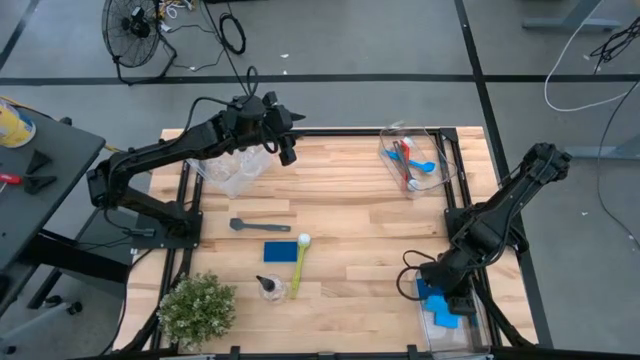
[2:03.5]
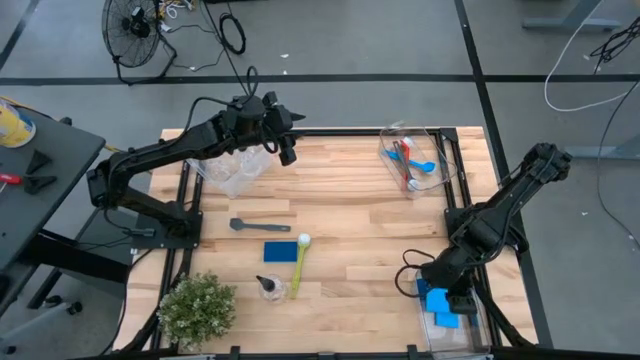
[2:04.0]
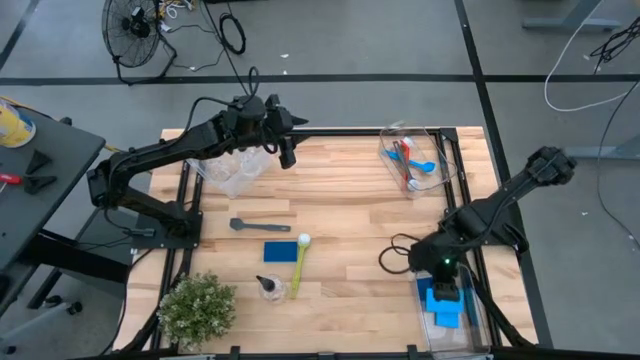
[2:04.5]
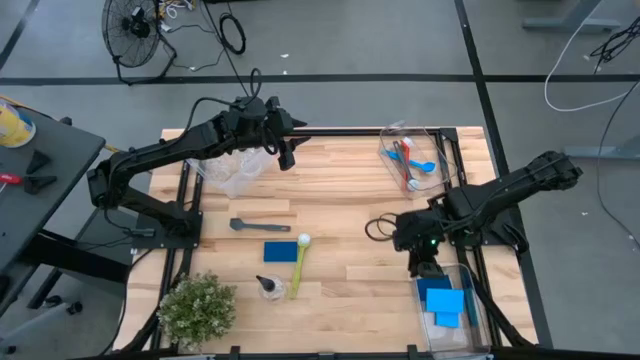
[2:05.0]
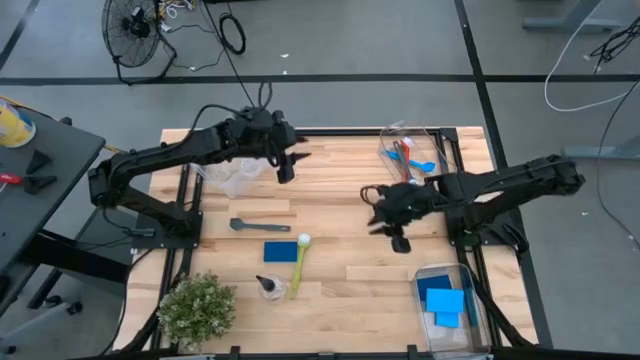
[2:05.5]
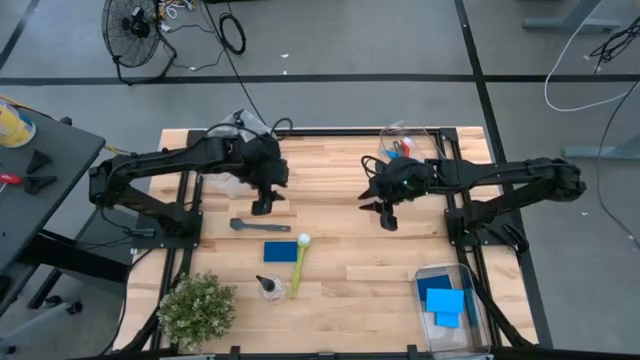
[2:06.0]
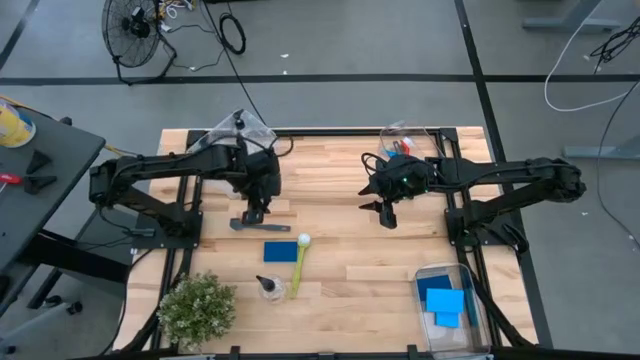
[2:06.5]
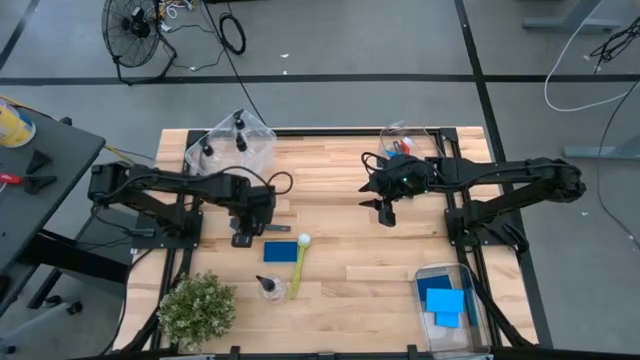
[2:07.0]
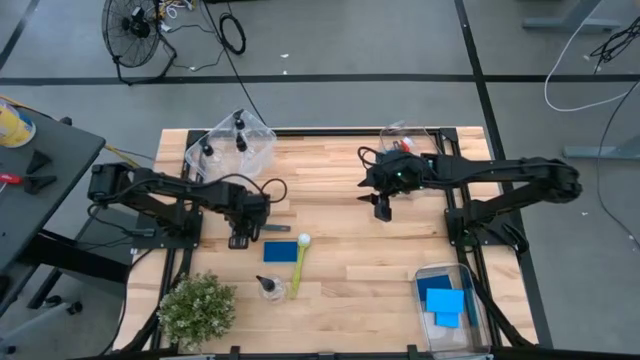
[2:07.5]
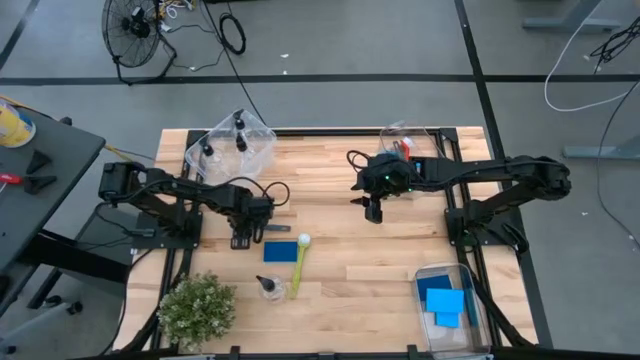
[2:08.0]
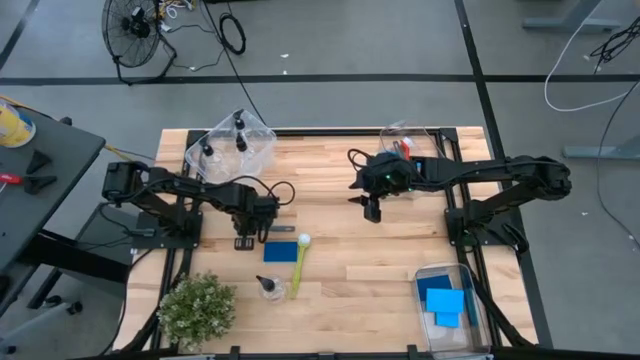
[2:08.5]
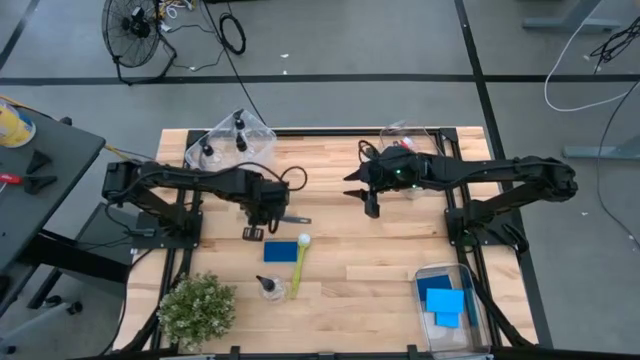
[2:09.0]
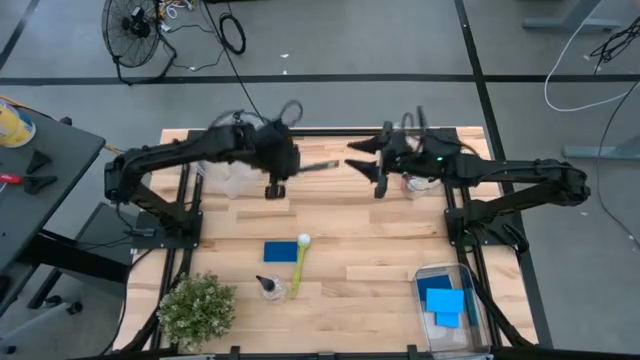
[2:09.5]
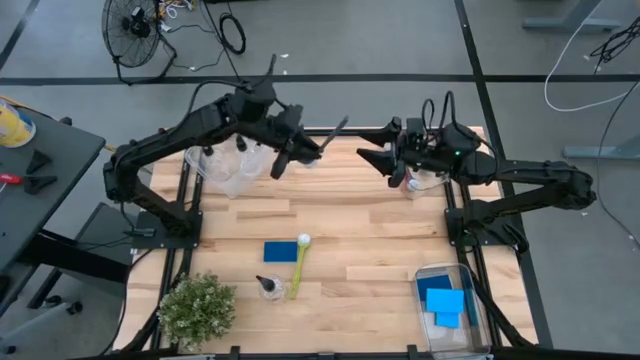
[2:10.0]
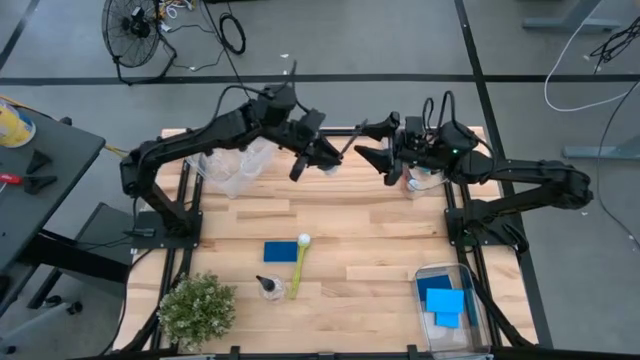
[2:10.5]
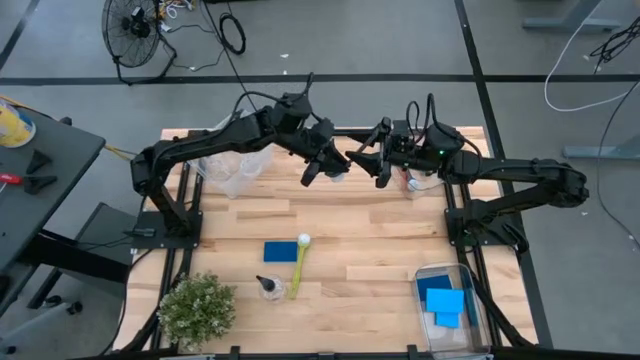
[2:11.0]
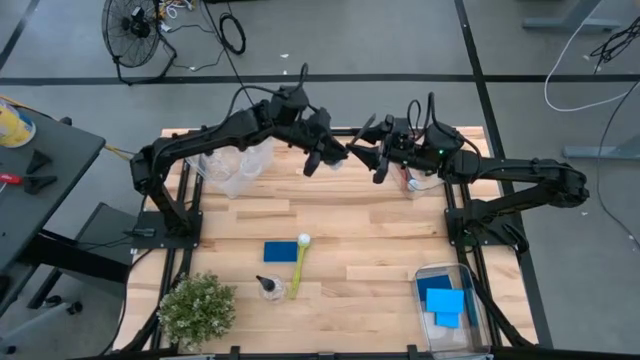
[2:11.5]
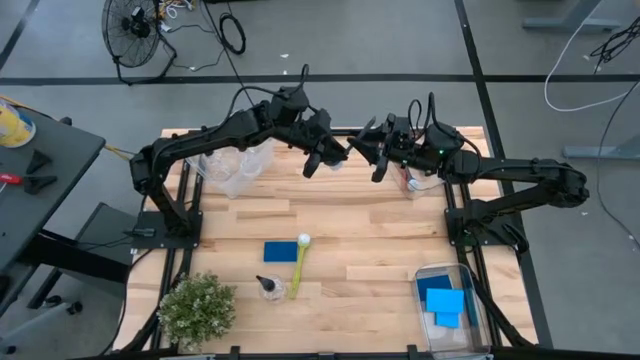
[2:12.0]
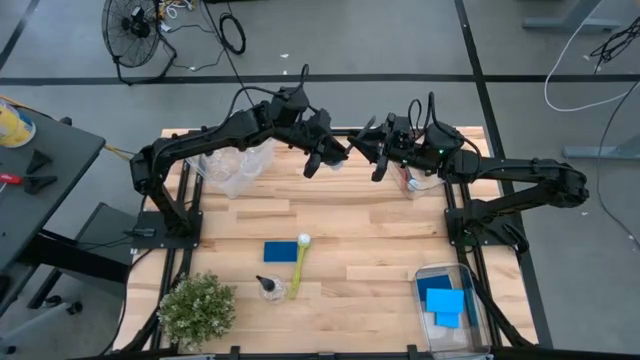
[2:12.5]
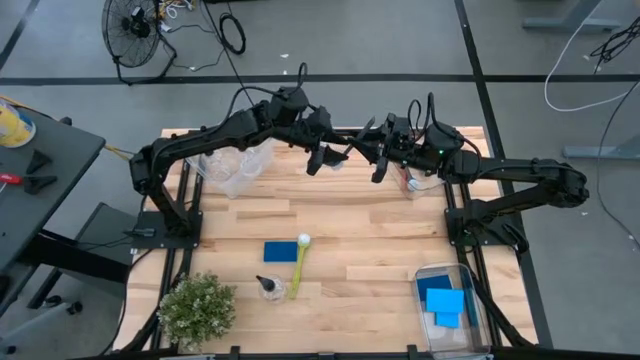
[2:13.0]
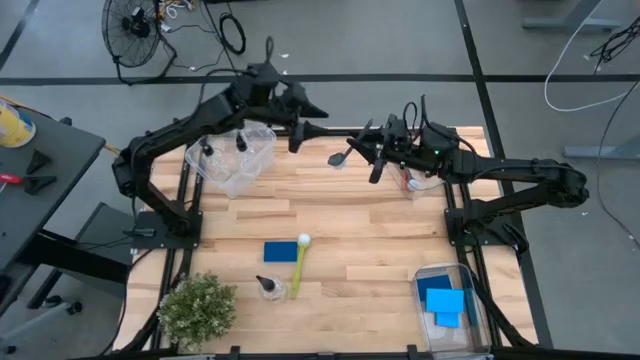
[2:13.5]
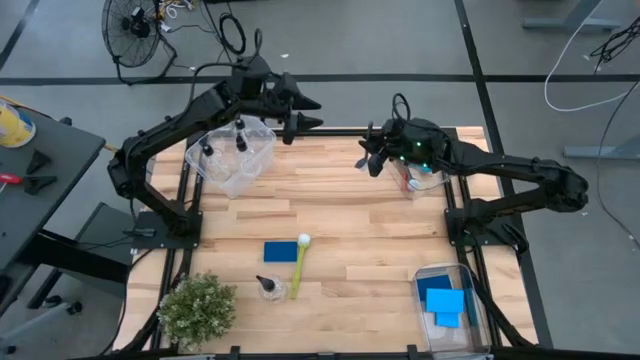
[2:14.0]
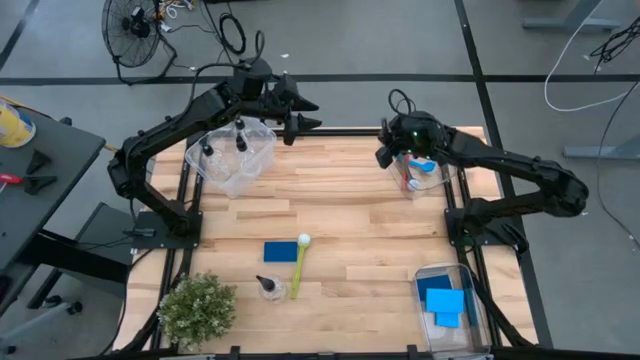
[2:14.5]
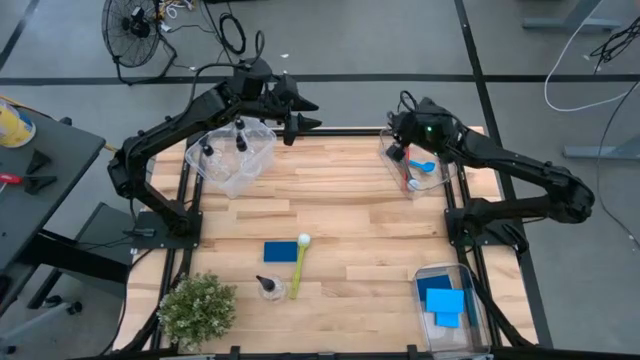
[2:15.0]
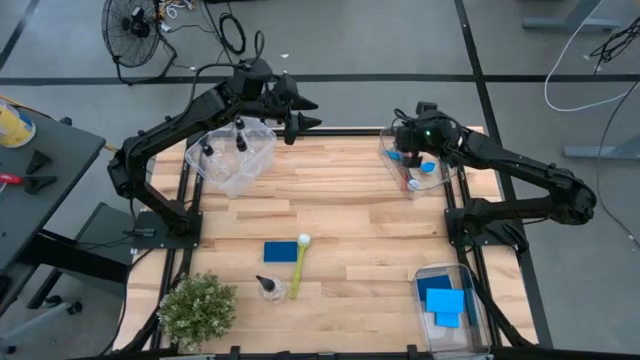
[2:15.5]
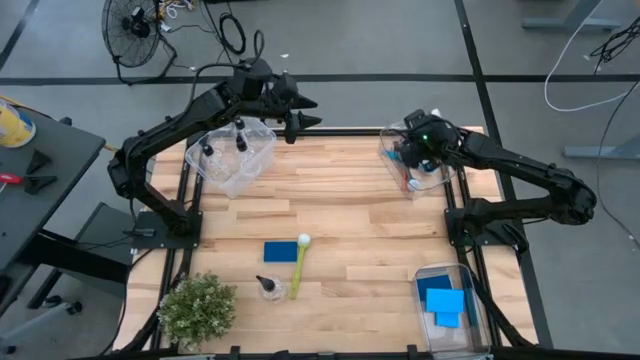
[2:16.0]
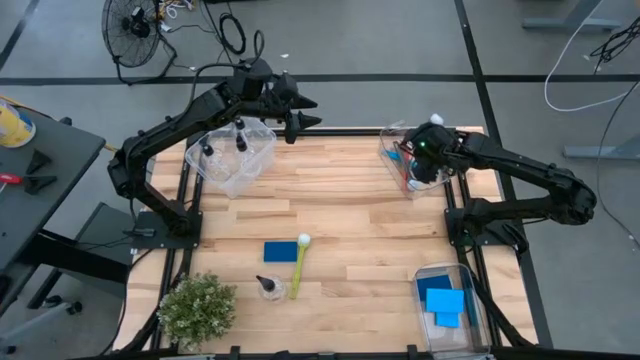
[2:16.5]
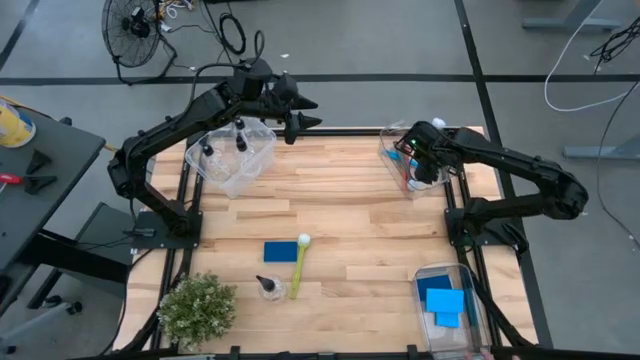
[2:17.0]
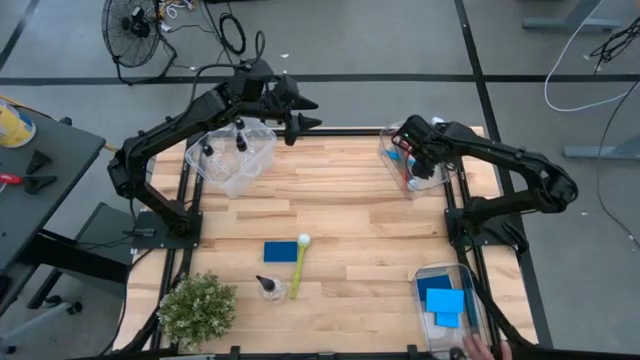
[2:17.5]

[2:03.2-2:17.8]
Task: Pick & Place Kitchen Sink Supplies
Put the gray cleaning brush into the top transparent bin

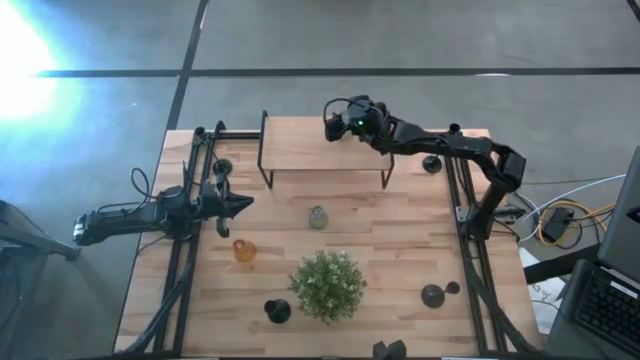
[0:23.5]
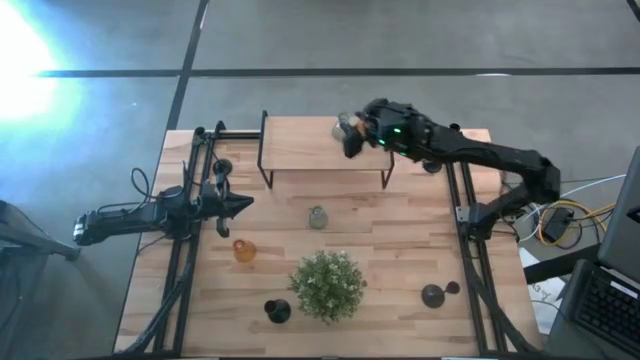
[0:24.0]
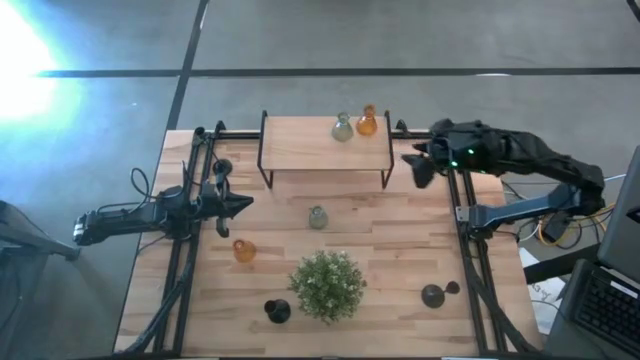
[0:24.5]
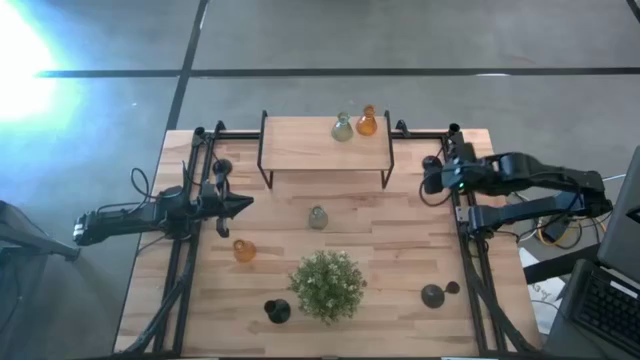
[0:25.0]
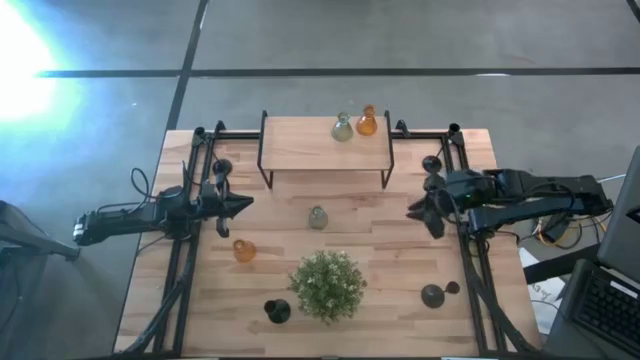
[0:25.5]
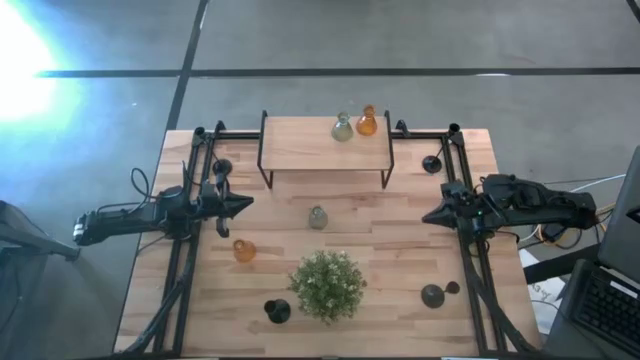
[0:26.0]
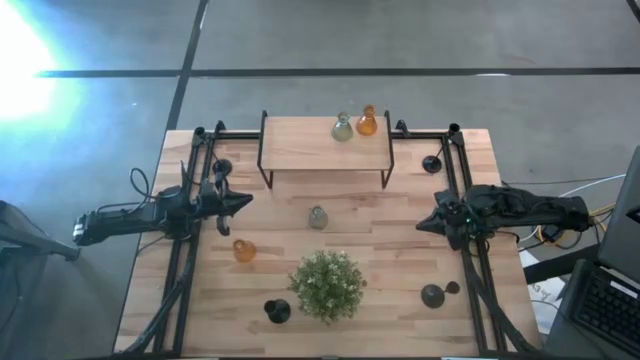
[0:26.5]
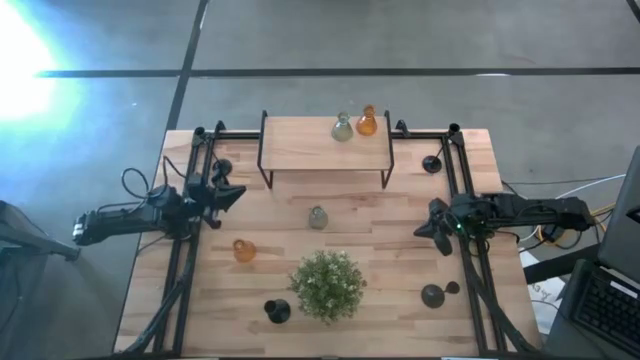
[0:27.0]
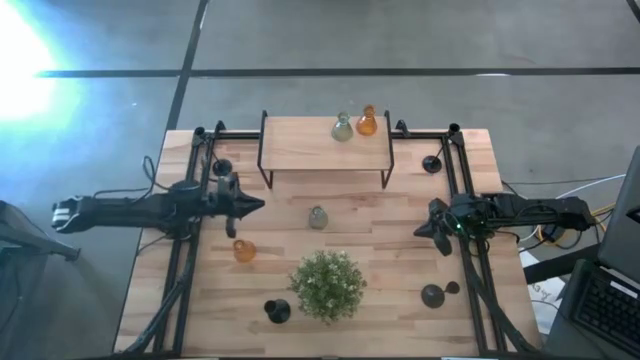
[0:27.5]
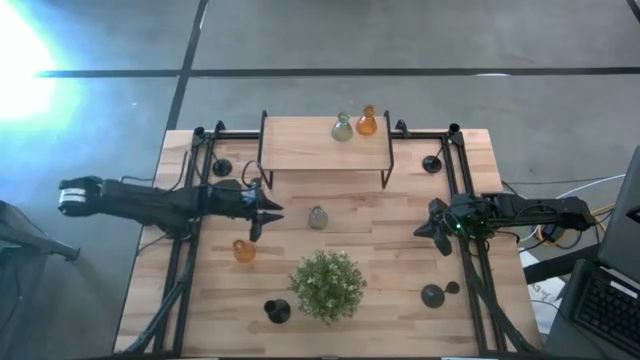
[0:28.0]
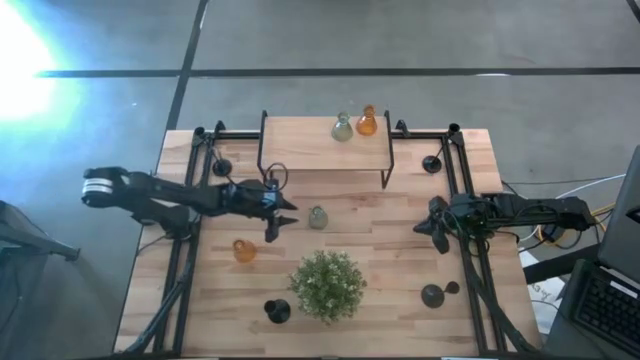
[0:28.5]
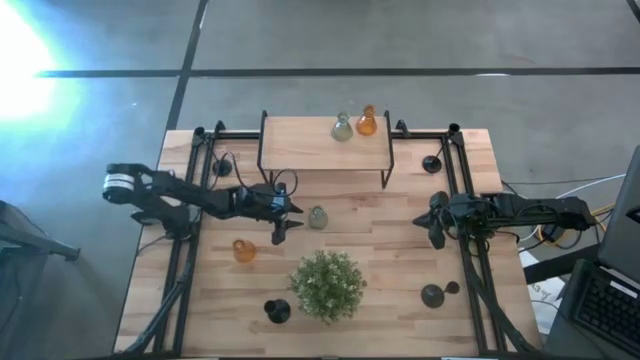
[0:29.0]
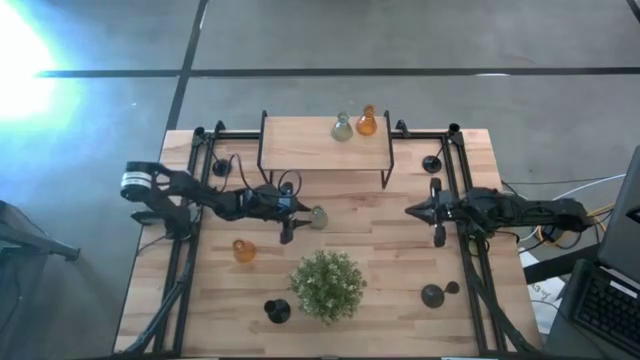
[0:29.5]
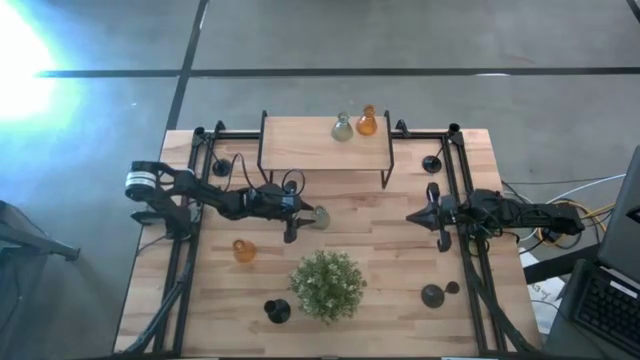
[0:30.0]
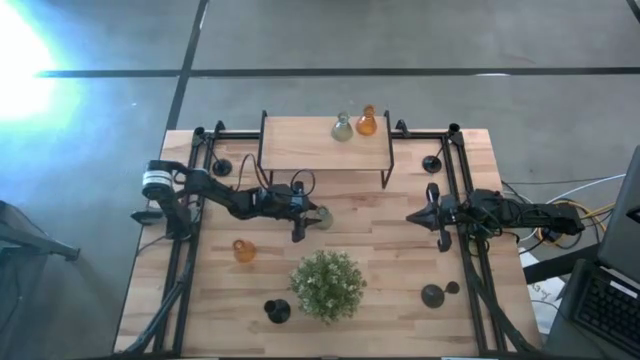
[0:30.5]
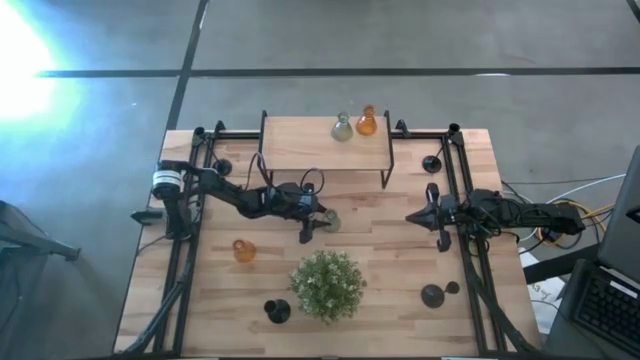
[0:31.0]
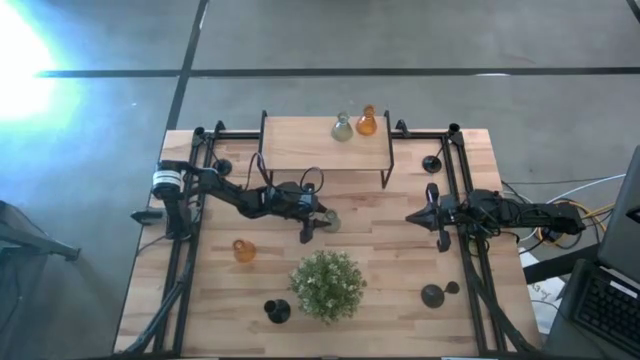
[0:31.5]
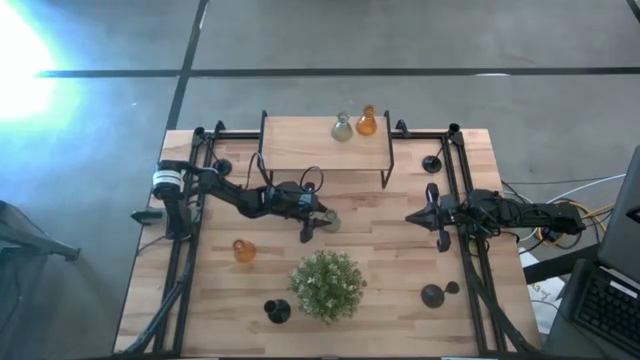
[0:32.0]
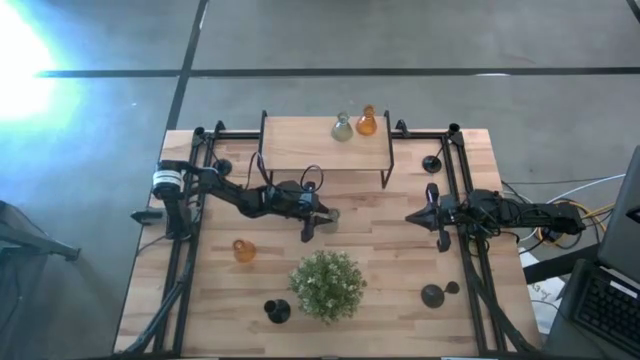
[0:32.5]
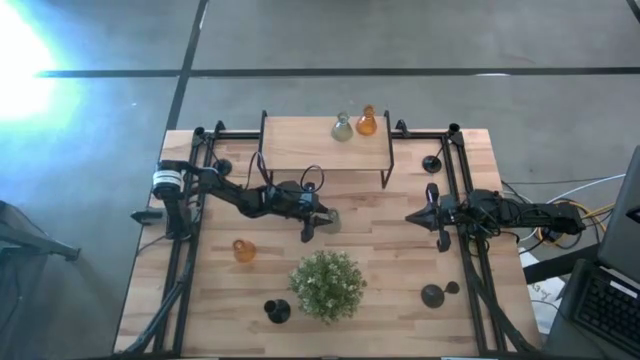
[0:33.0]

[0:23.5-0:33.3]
Task: Pick & Place candle stick holders
Put the green glass candle holder on the shelf aligned with the other glass candle holder
